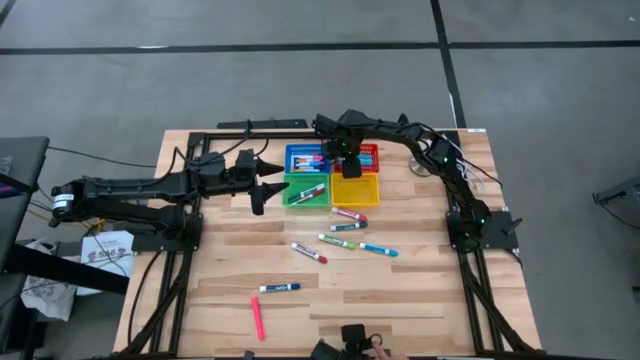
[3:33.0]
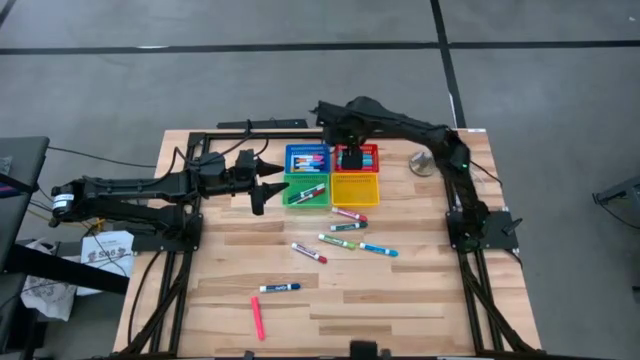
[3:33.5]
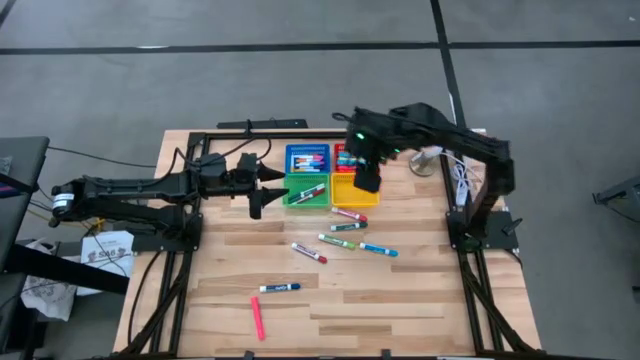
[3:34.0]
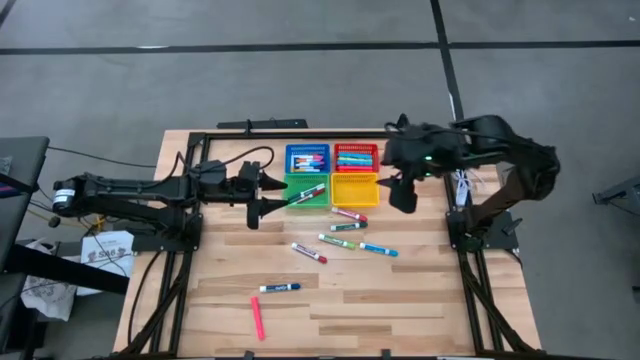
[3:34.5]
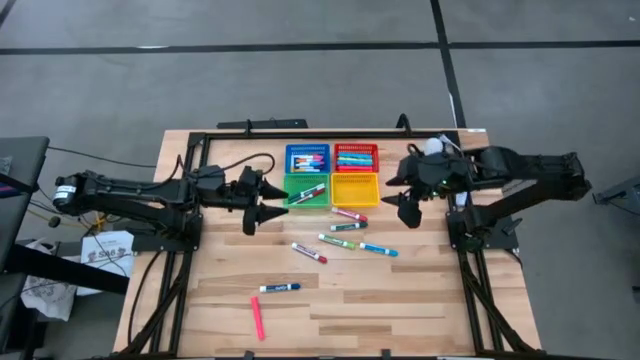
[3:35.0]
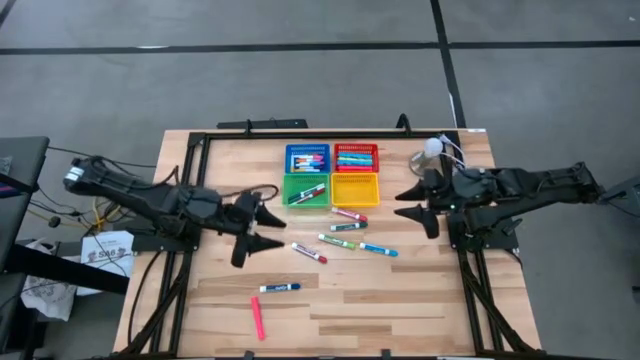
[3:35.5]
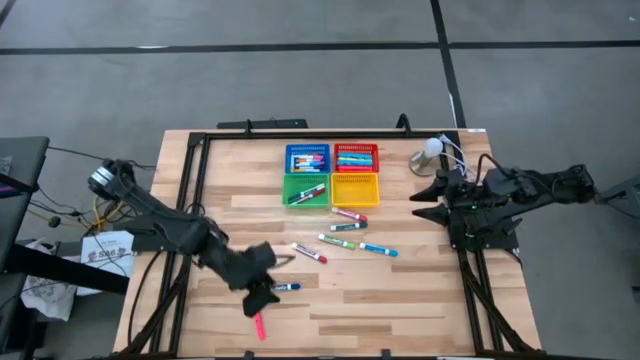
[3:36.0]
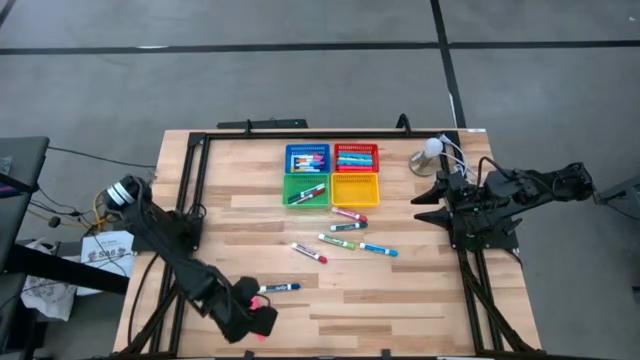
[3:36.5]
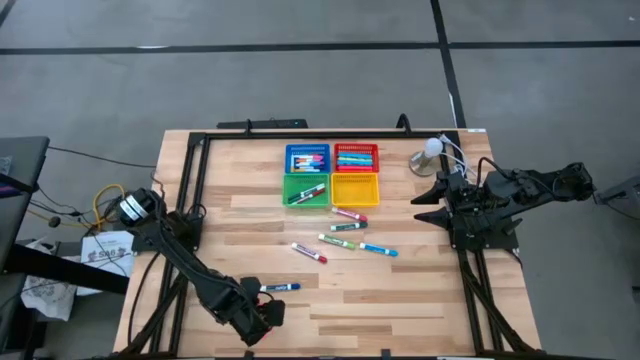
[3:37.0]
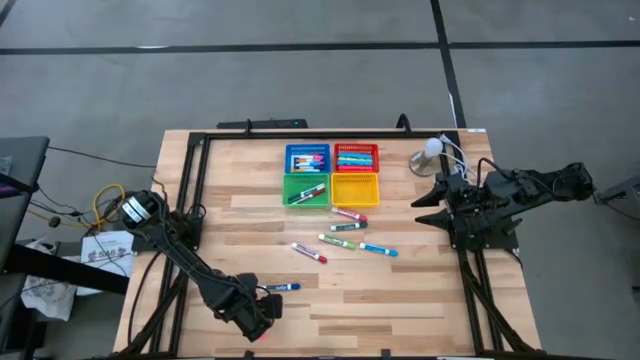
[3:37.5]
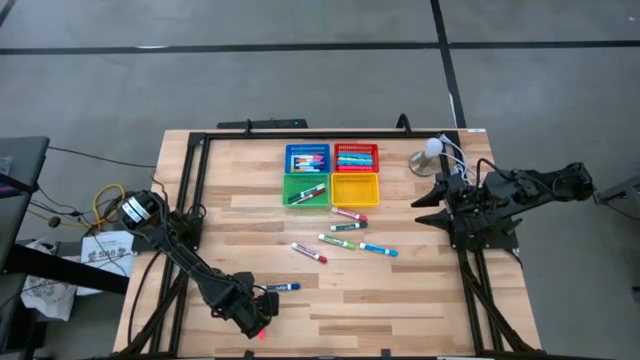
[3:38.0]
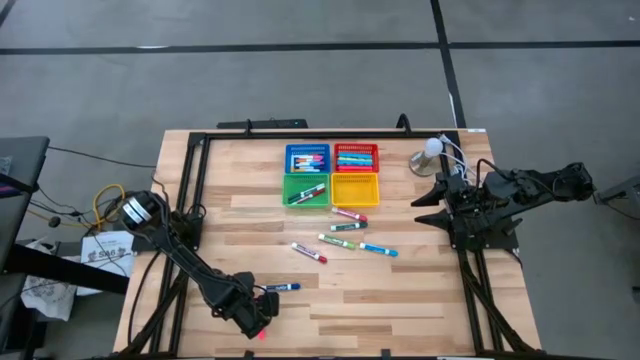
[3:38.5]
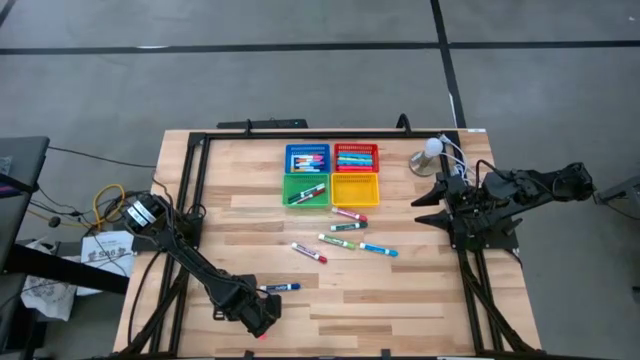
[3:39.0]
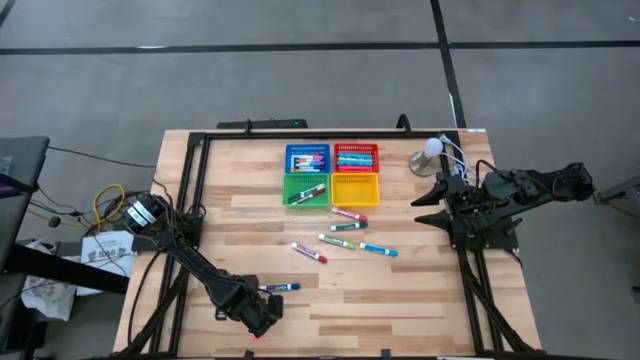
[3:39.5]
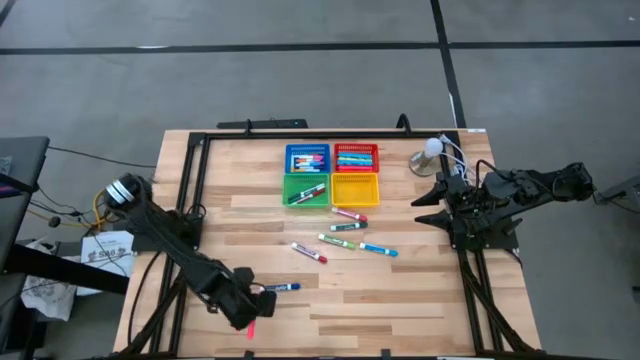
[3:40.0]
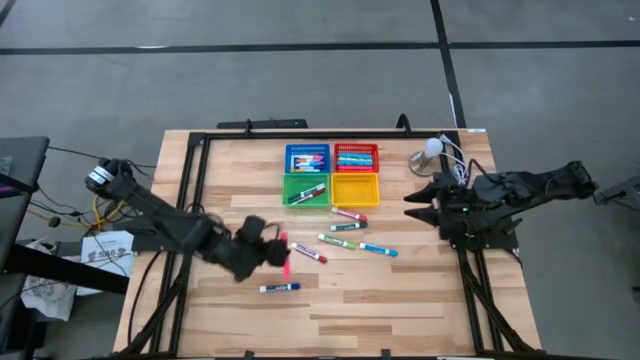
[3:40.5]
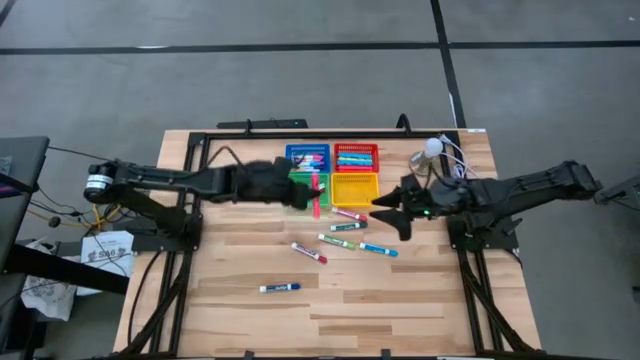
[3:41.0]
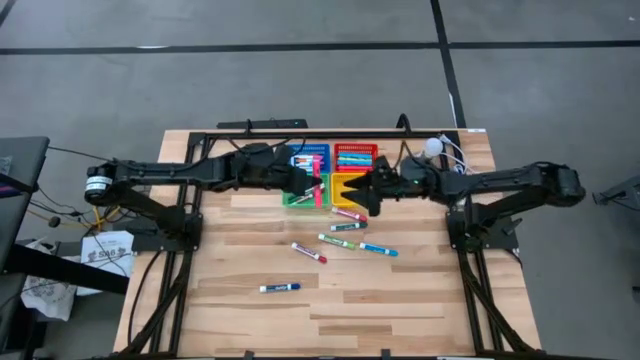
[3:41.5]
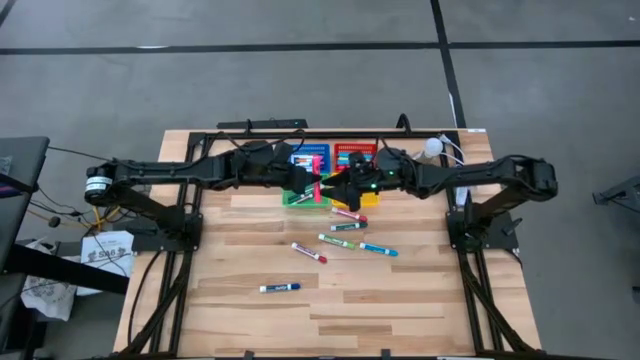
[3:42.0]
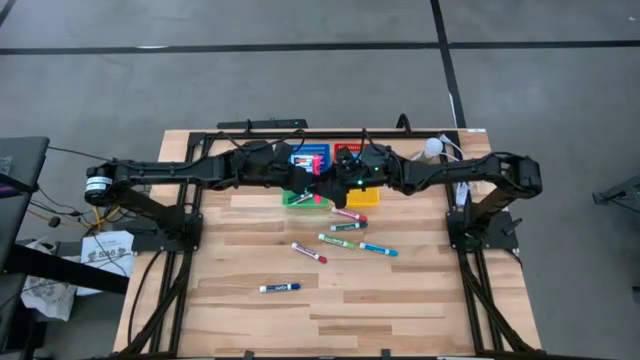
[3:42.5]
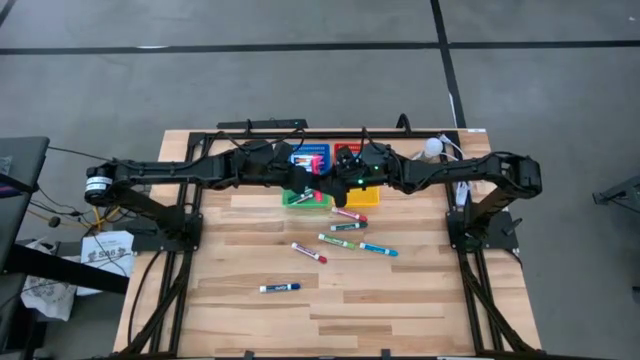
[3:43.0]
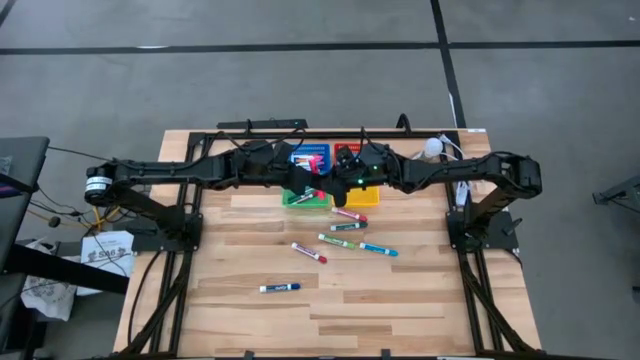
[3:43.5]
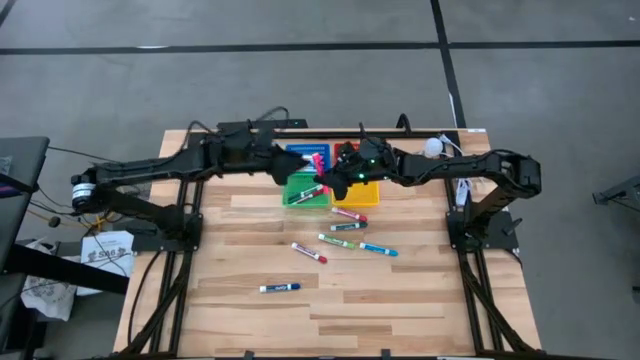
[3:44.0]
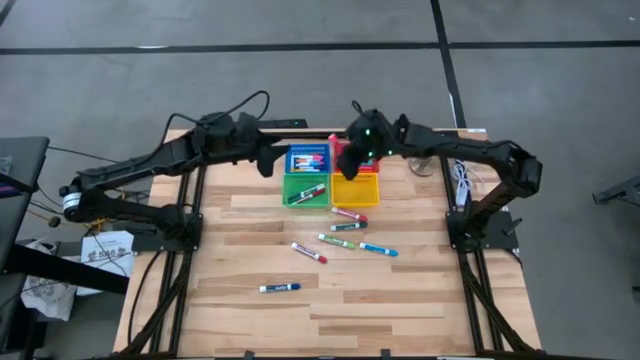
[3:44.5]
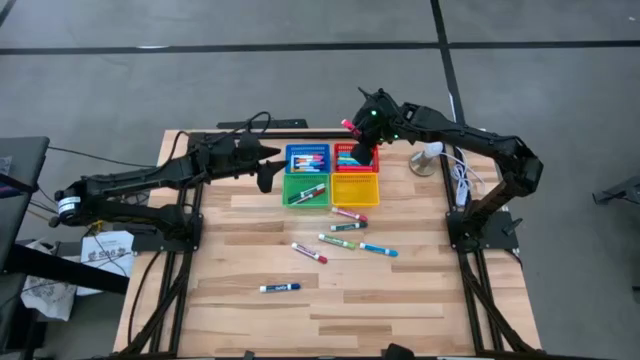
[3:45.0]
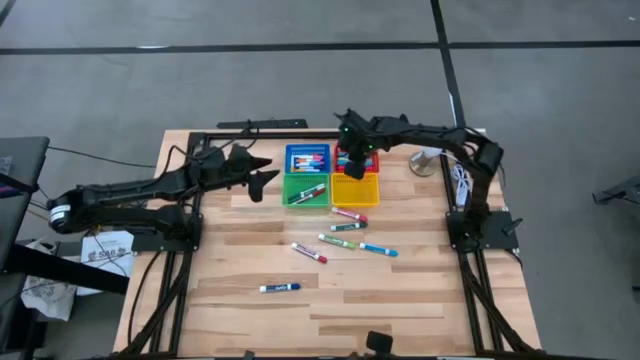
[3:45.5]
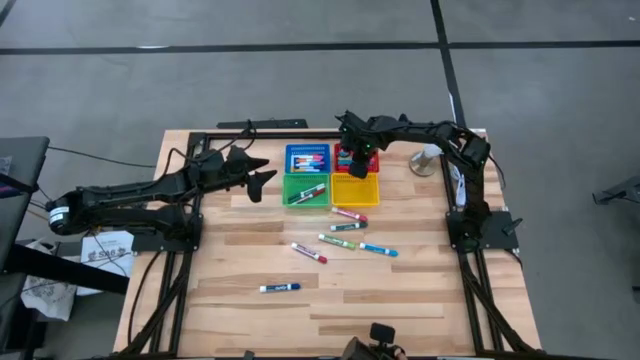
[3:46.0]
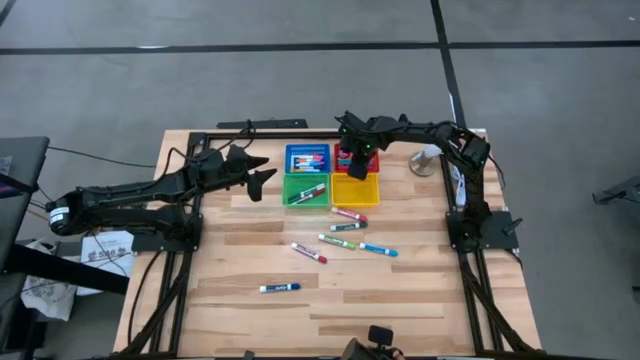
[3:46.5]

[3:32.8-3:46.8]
Task: Pick & Place Markers
Put the large pink highlighter into the red bin

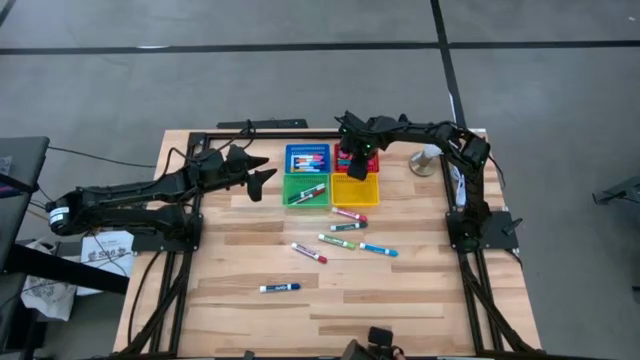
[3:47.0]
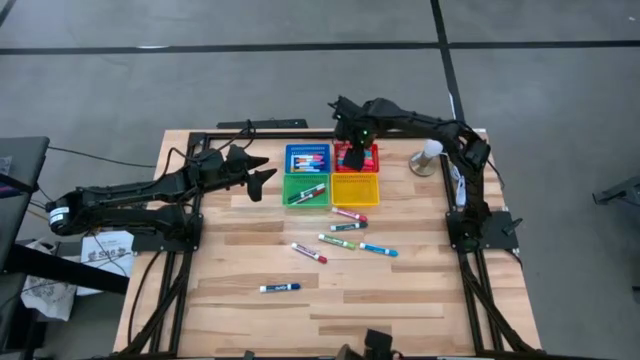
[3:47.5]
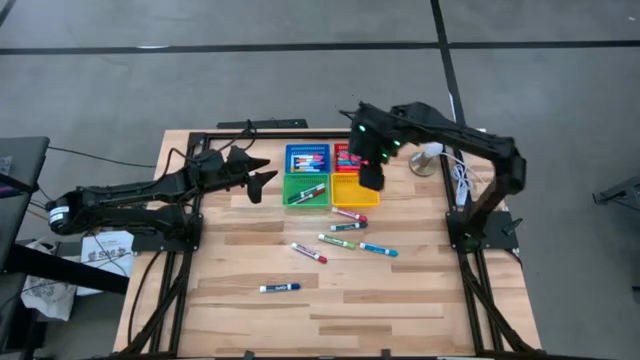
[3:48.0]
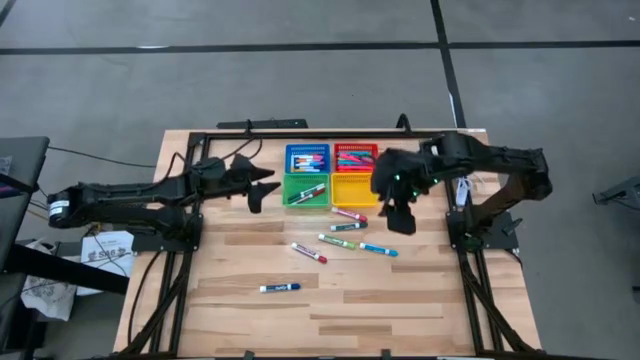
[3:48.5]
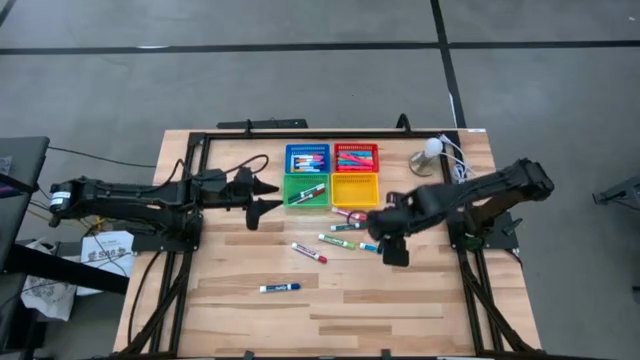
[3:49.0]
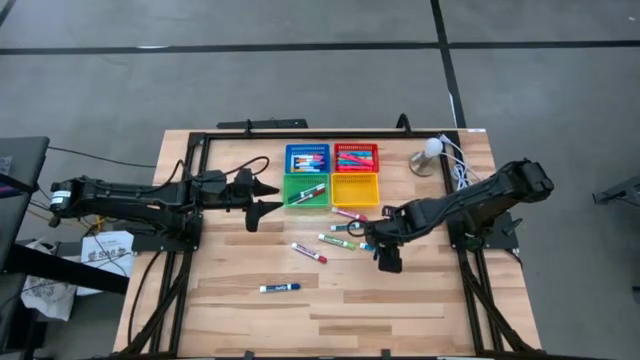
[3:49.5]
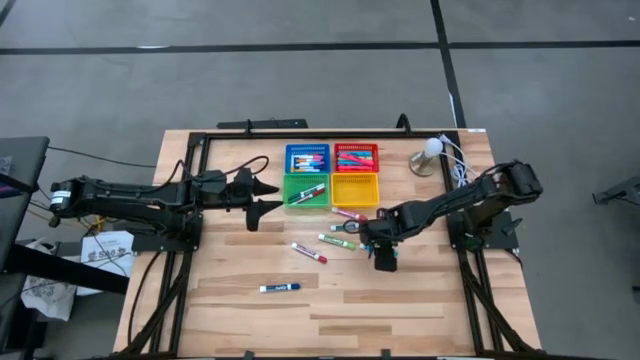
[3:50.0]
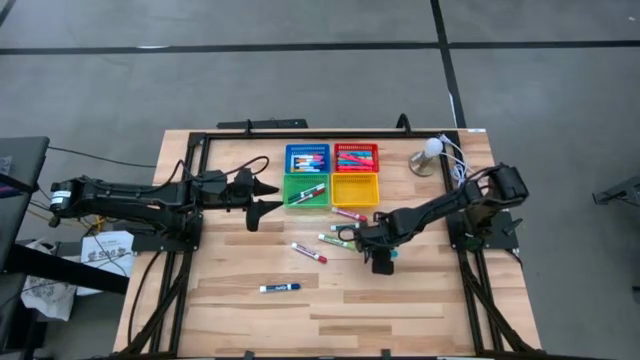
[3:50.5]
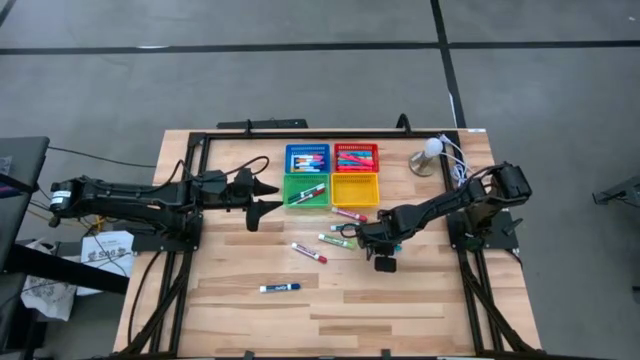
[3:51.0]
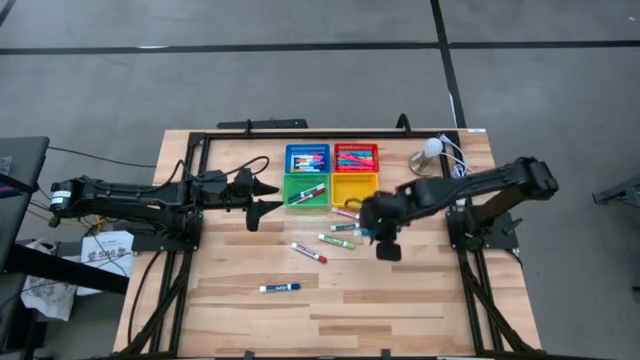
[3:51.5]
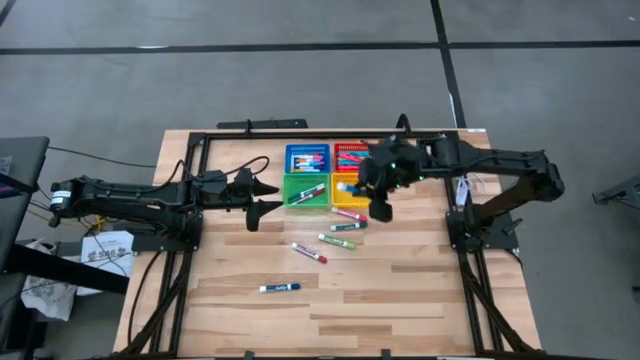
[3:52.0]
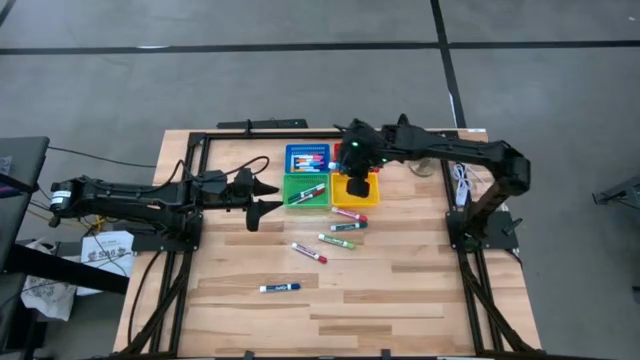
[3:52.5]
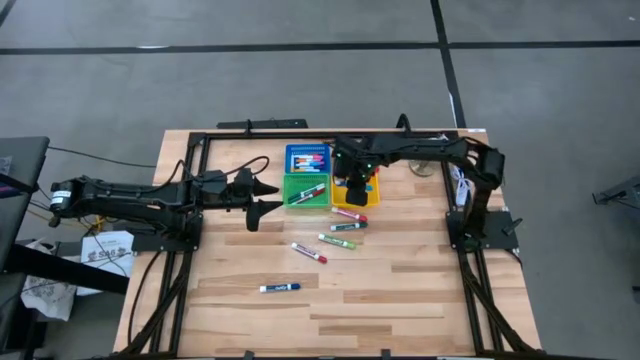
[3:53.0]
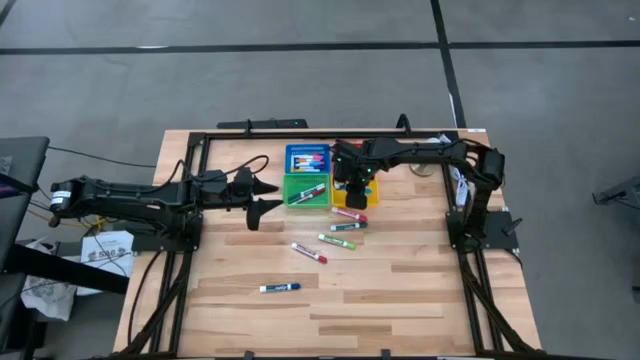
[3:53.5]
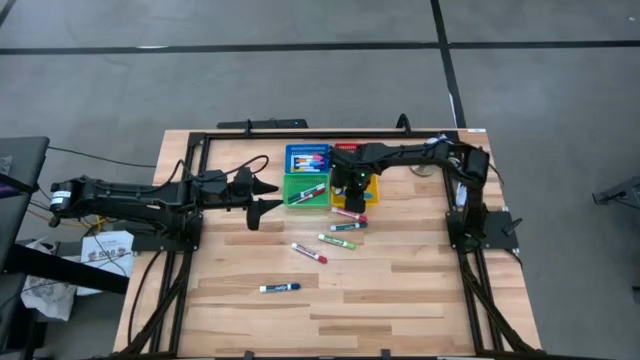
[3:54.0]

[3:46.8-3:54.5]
Put the large light blue marker into the yellow bin
